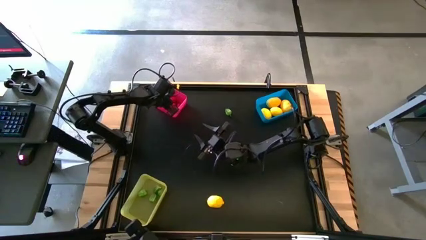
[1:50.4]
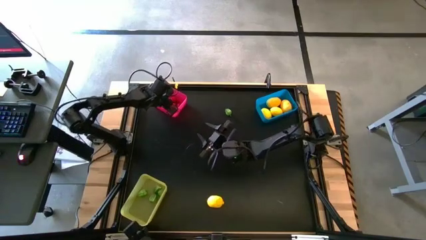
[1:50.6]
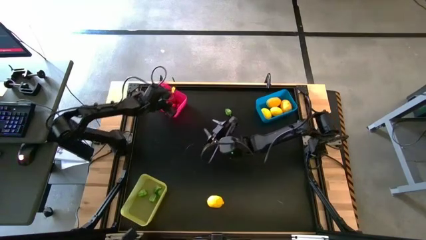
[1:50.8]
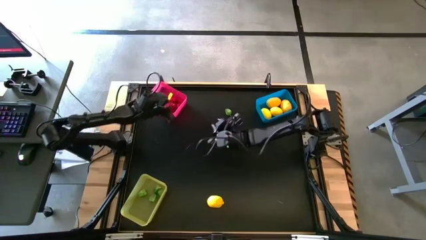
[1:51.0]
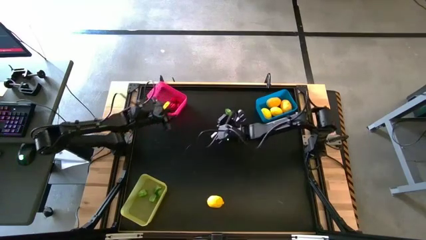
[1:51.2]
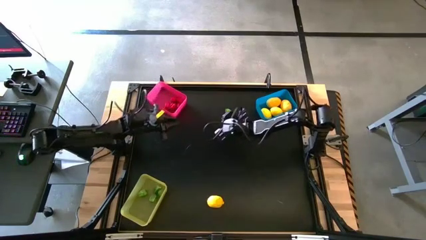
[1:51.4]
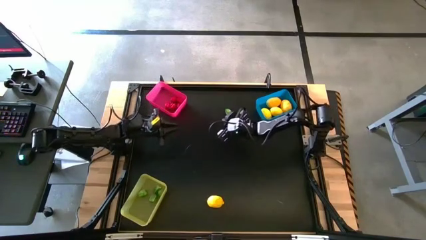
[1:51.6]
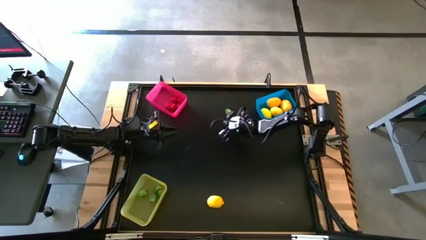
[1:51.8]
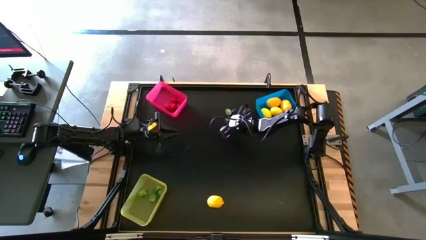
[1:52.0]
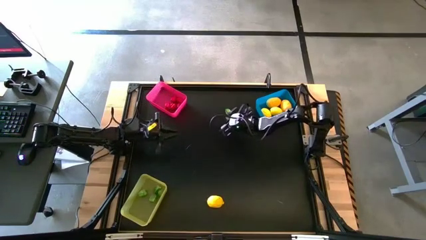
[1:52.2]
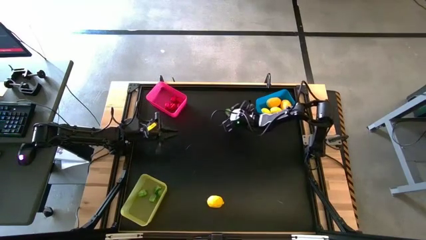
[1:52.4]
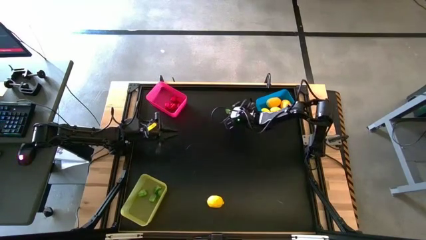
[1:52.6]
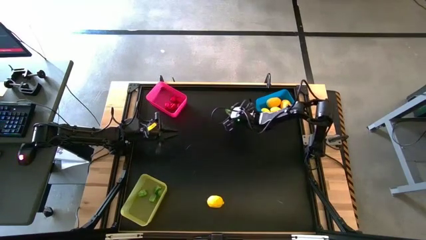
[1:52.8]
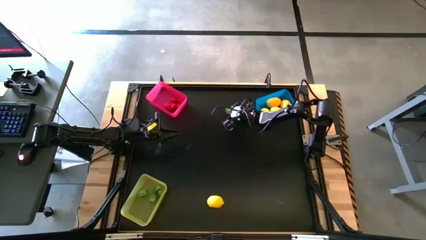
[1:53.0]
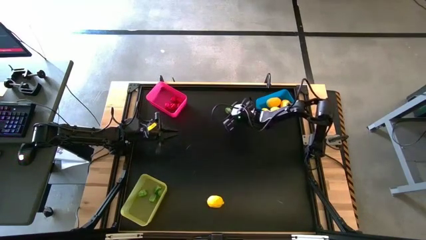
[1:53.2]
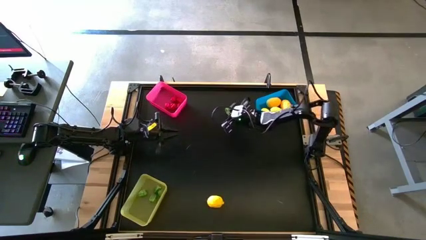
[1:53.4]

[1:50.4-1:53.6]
Task: Sort produce into baskets
Put the green bell pepper into the yellow bin

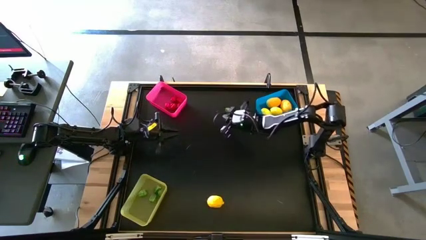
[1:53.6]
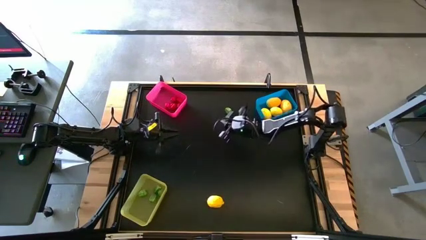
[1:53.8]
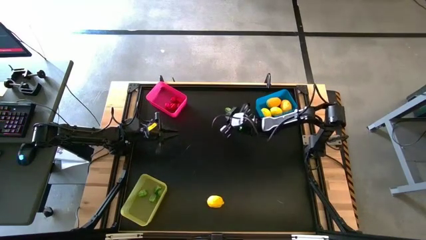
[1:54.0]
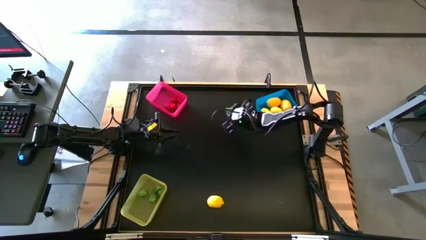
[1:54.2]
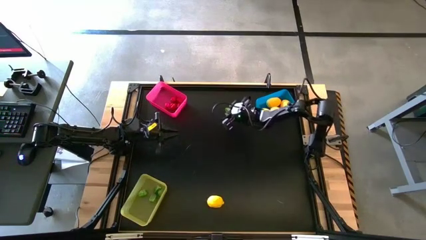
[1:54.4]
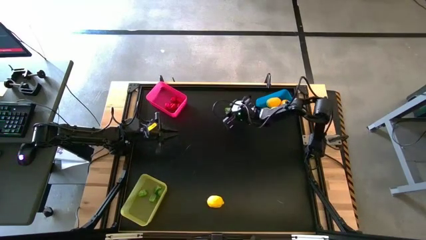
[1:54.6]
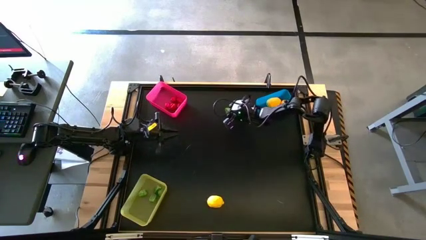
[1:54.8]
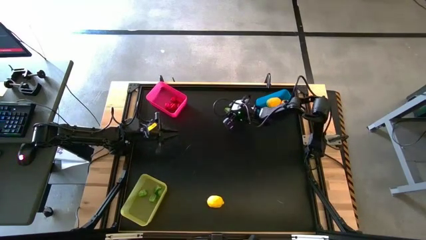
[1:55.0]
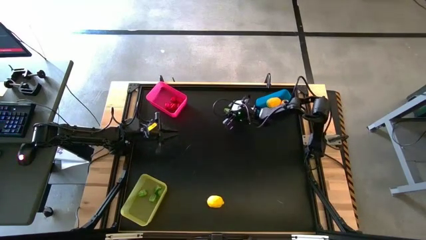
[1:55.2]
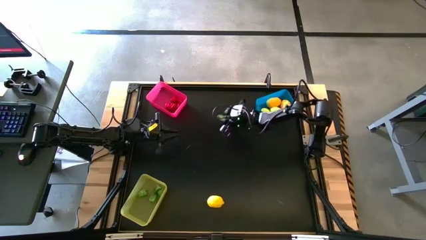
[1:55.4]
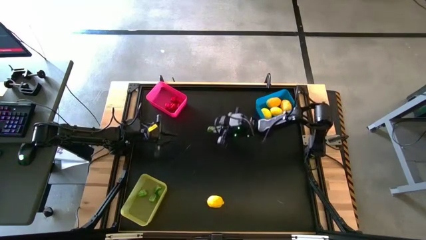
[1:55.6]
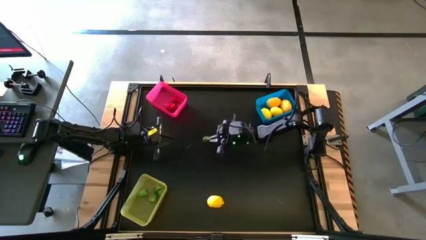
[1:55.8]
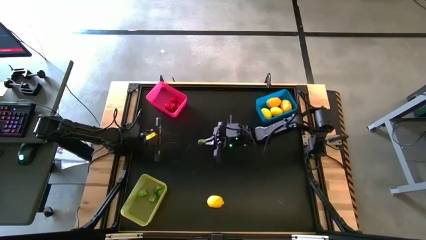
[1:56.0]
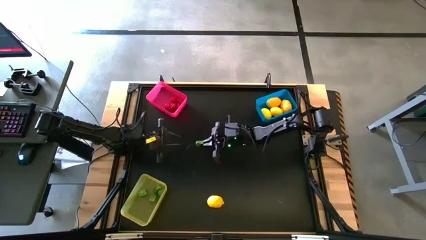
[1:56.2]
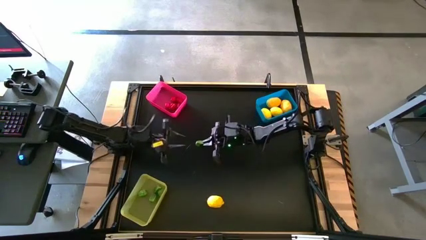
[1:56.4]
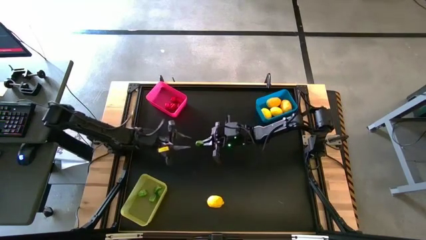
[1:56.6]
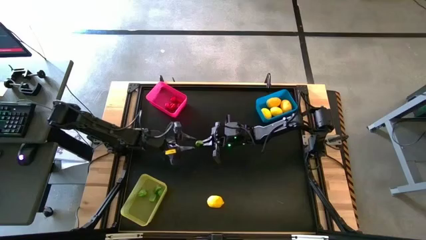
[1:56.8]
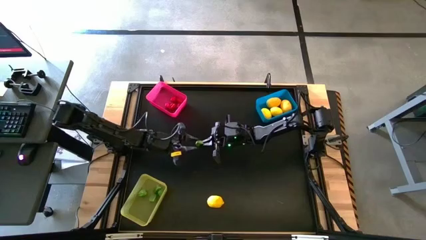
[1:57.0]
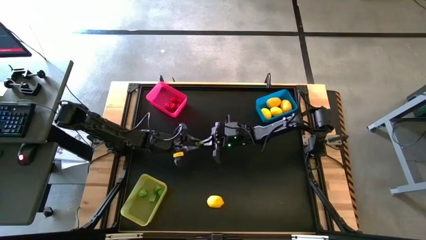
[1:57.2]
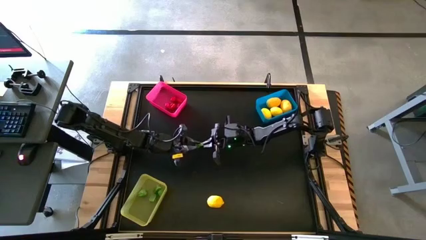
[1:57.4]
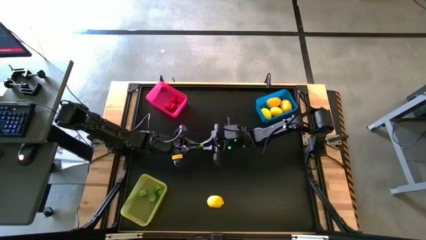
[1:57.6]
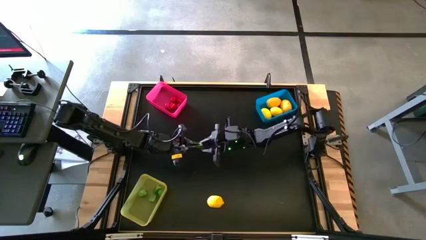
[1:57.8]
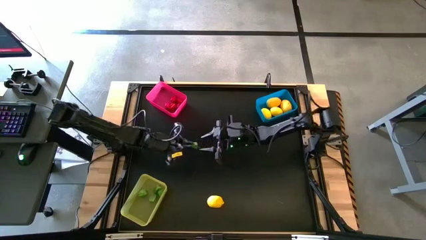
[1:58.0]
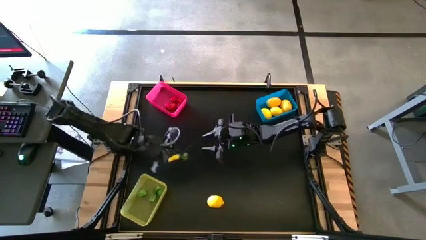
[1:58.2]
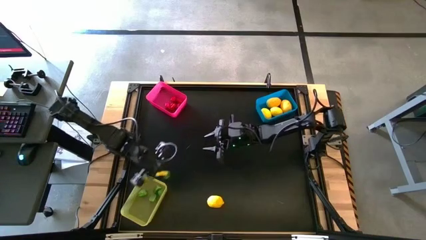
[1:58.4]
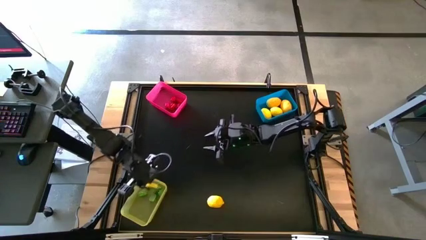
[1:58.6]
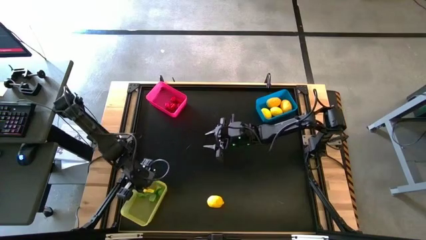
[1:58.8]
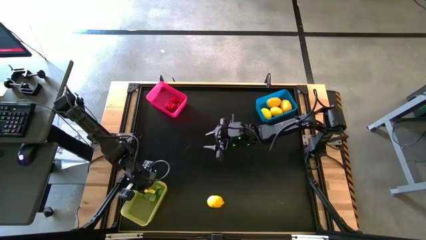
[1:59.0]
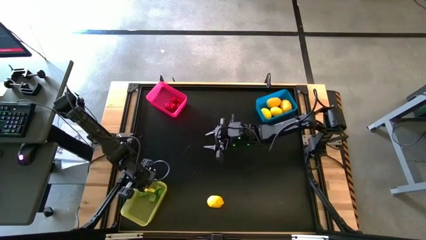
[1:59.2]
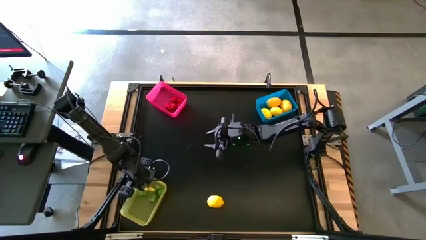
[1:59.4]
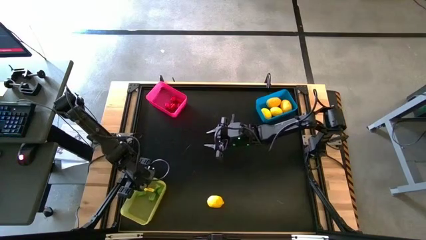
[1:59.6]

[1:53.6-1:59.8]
Put the green bell pepper into the yellow bin

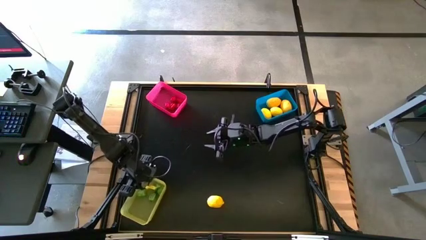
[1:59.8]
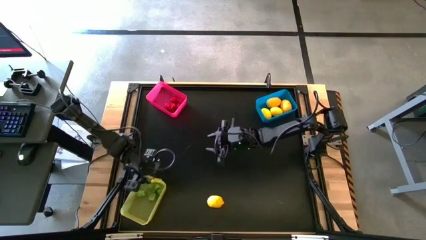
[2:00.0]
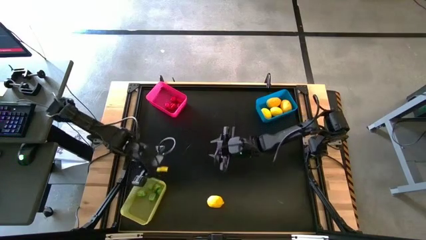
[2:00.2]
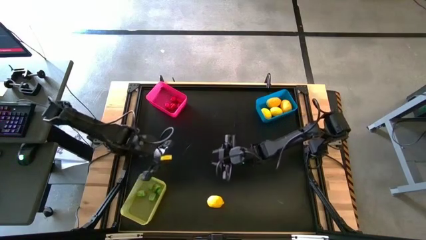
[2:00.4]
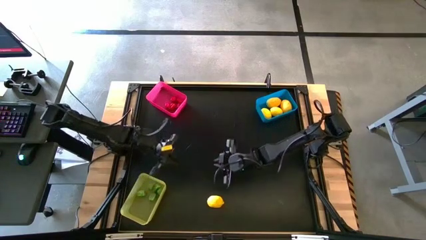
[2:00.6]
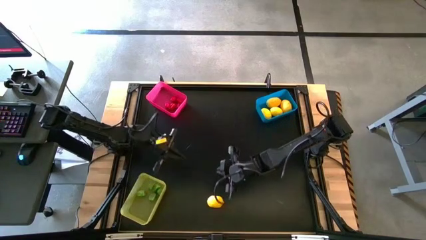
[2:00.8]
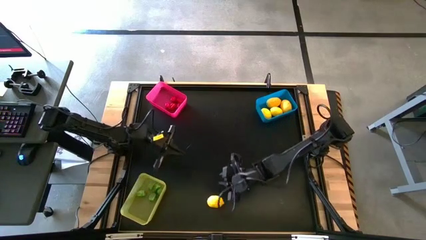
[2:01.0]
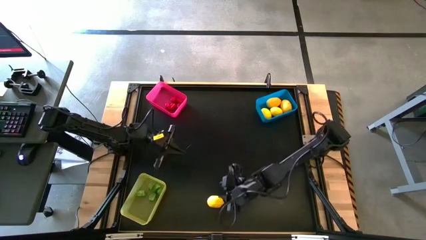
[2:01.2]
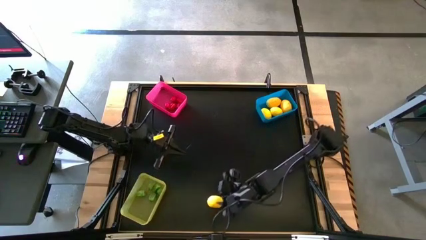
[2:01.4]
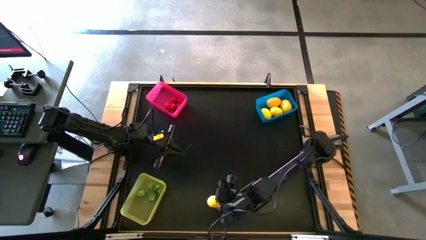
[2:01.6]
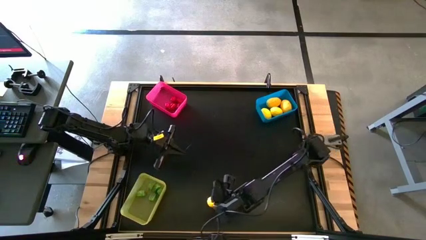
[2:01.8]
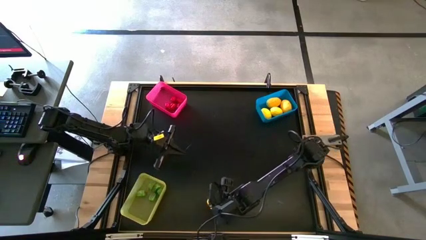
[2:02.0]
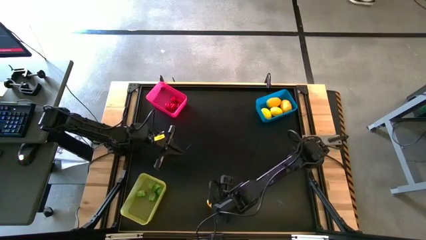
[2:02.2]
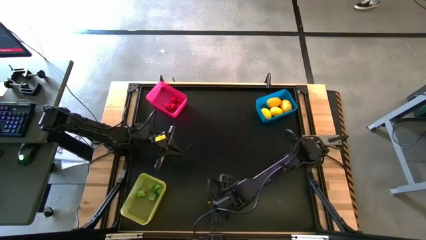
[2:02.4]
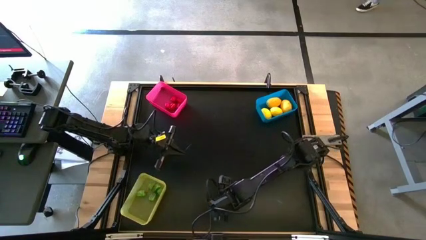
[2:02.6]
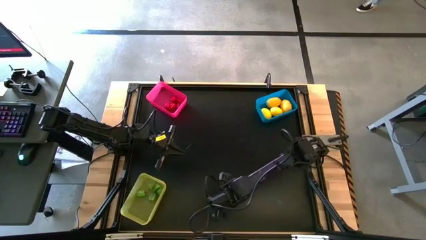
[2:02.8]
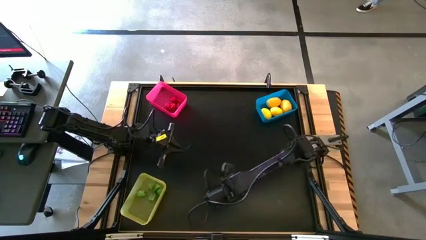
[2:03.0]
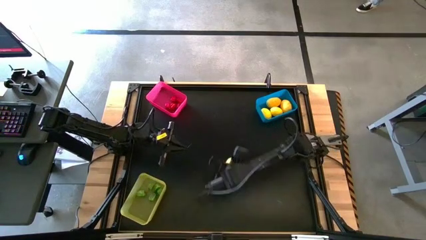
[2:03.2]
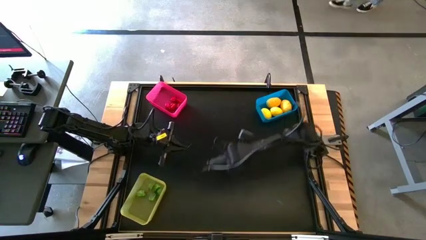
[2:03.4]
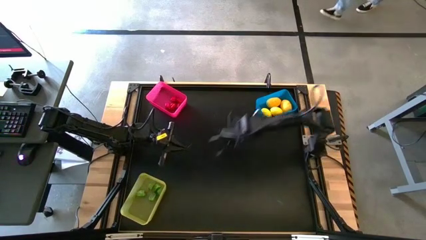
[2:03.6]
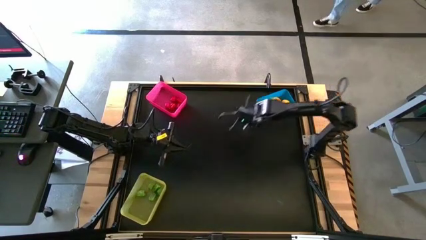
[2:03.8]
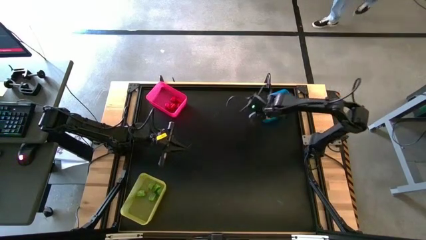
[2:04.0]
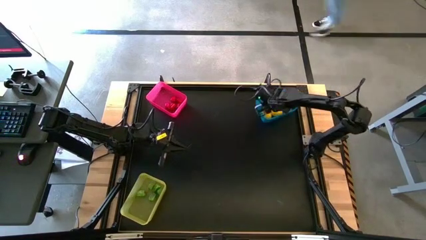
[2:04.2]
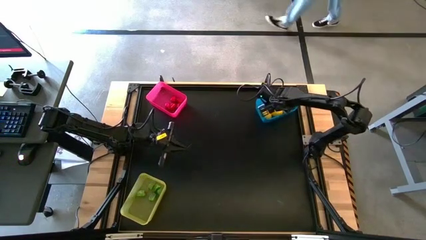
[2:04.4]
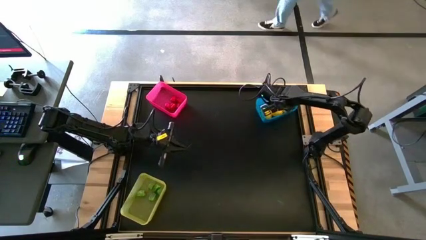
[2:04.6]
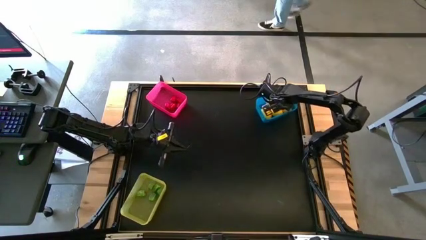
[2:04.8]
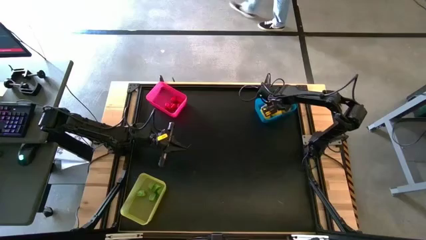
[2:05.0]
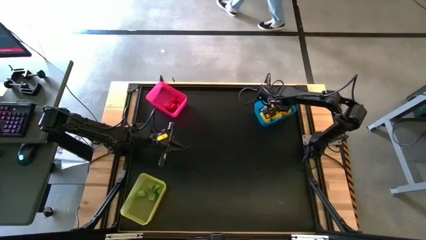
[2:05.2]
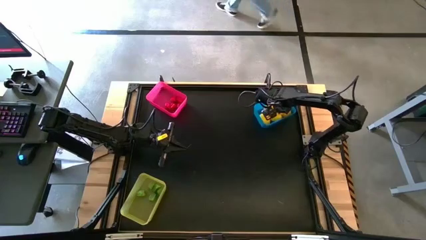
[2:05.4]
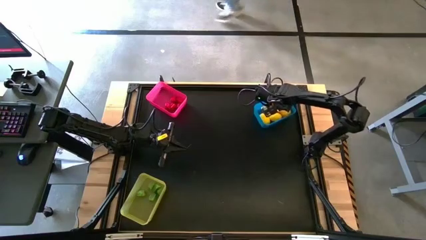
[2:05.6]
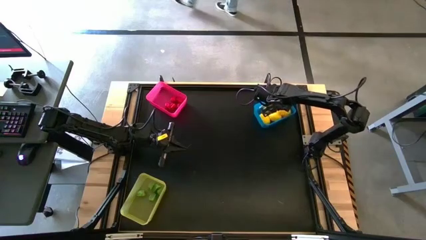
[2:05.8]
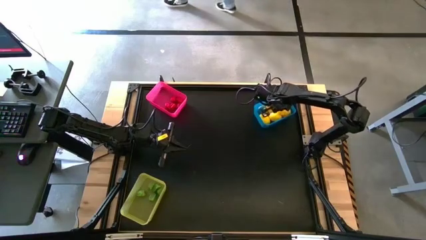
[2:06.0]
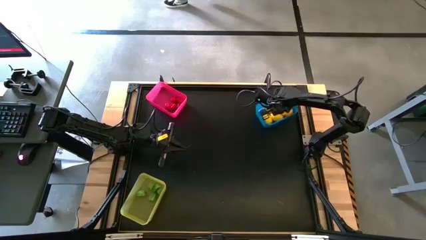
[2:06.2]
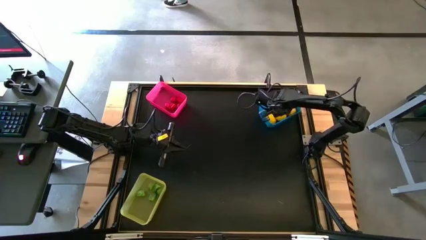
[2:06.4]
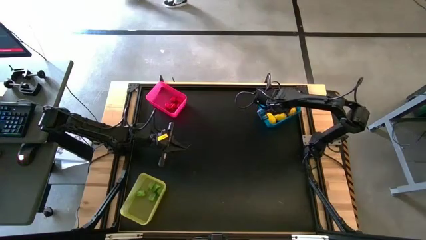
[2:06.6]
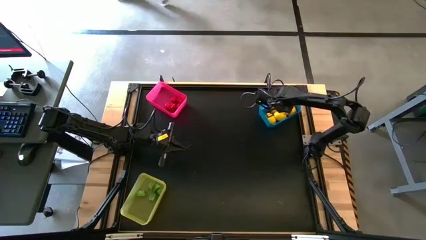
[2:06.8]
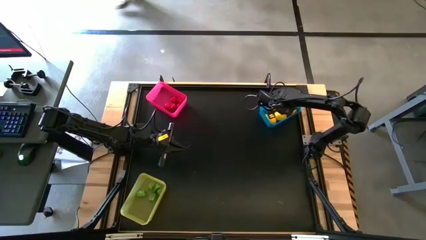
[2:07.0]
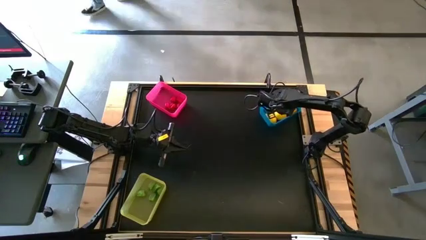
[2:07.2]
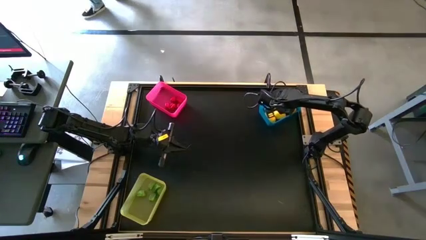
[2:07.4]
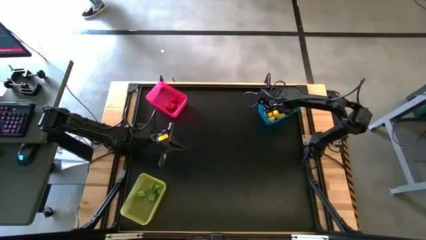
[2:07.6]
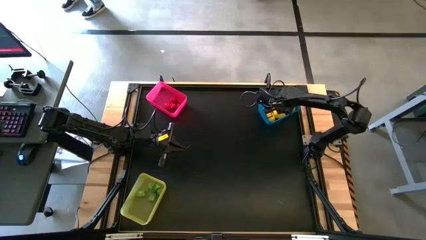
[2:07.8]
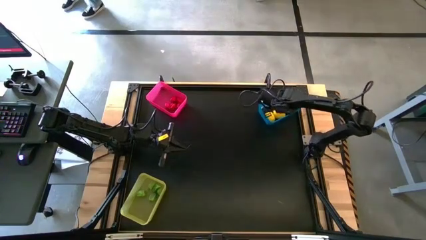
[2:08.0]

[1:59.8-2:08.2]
Put the yellow lemon into the blue bin
